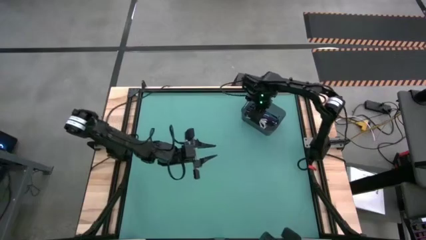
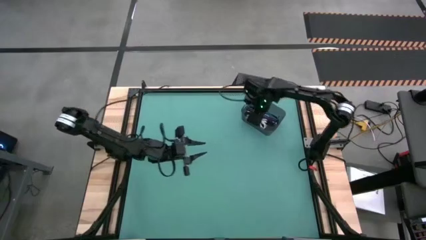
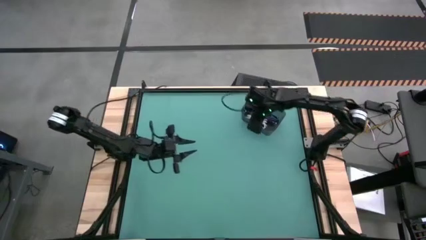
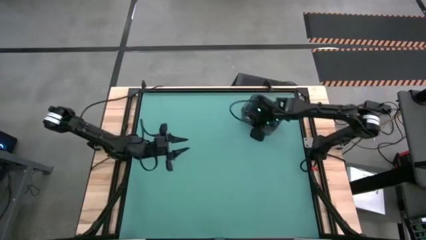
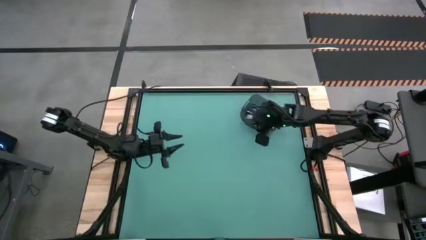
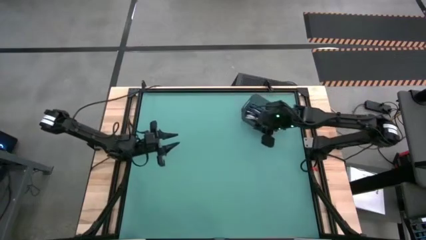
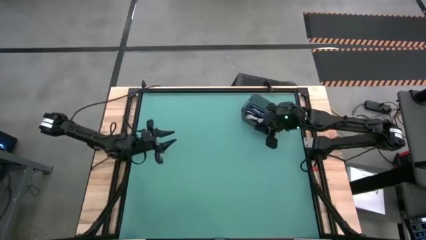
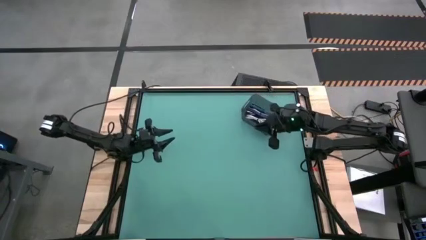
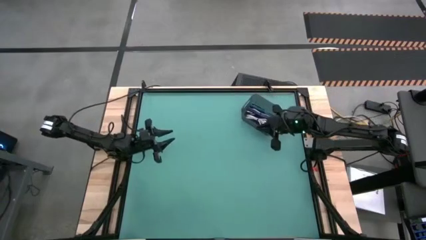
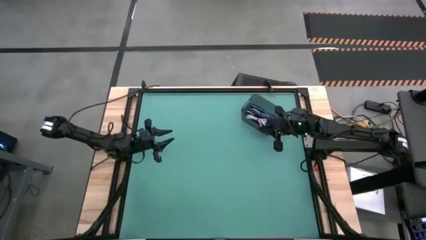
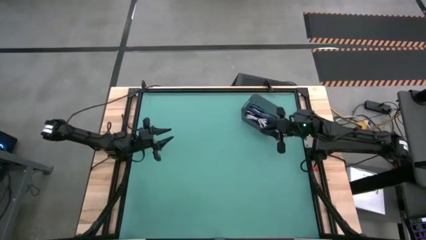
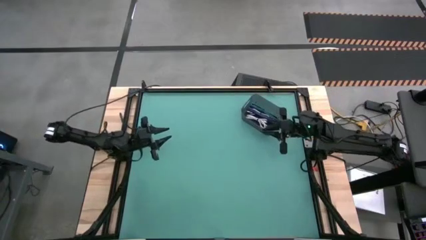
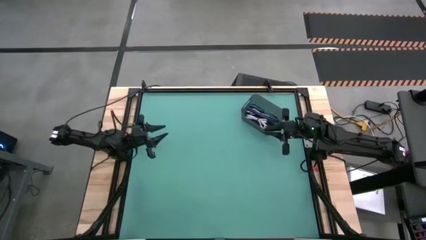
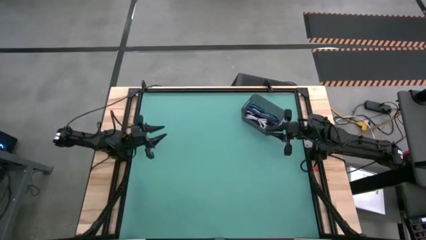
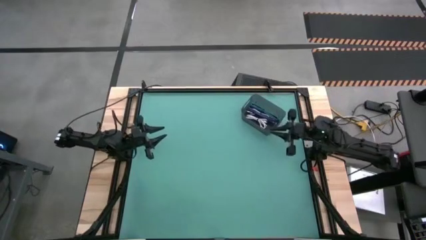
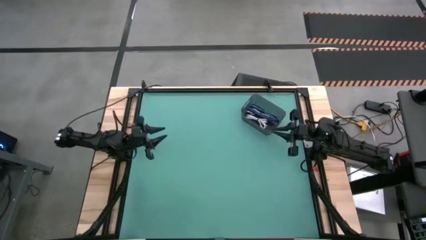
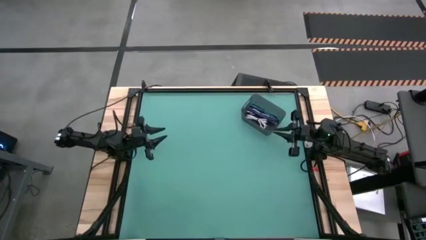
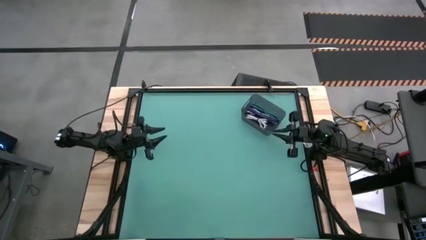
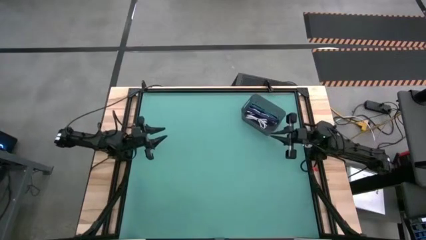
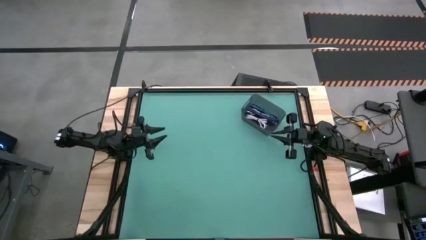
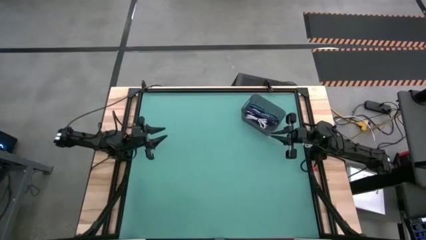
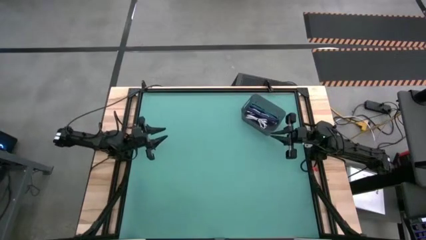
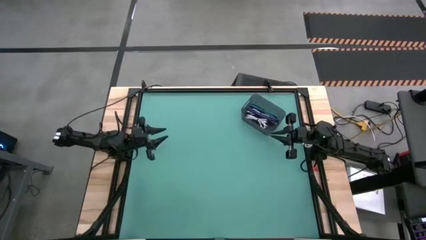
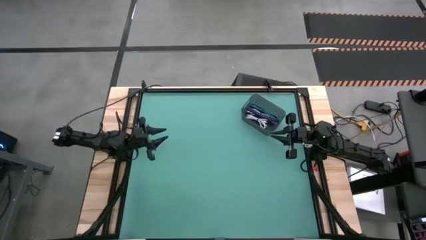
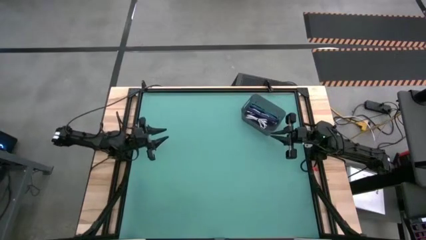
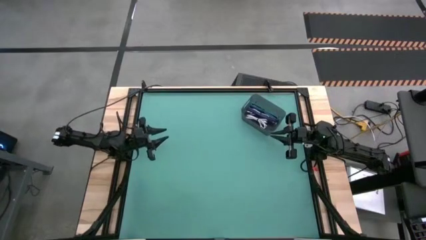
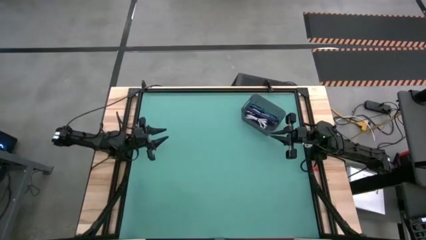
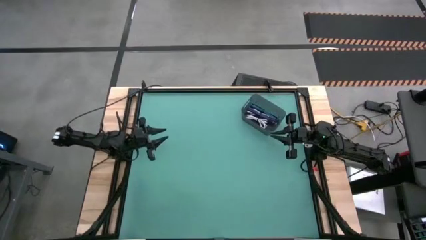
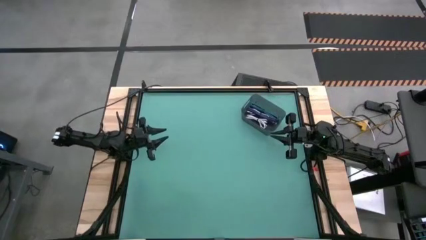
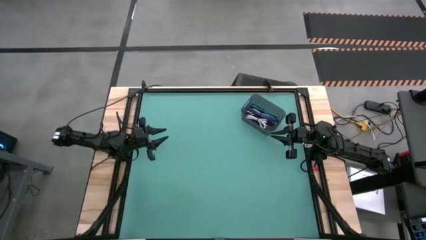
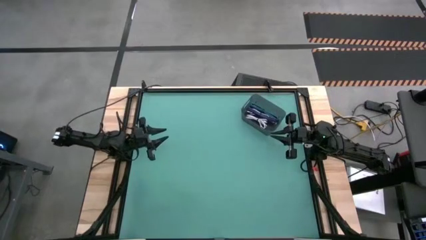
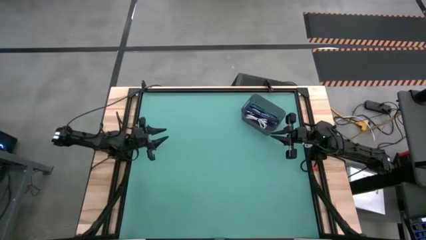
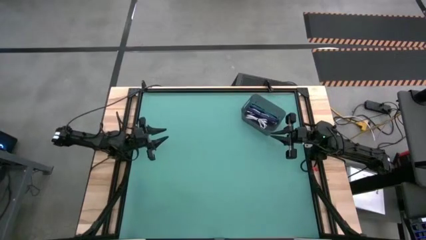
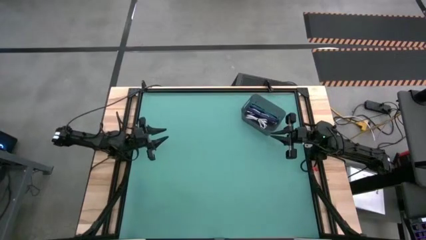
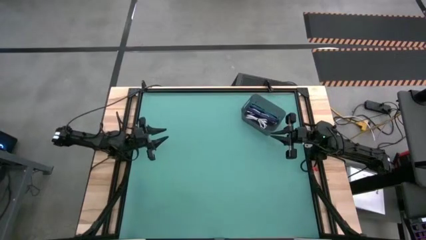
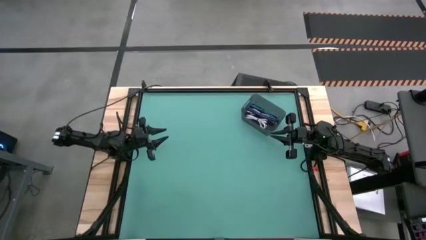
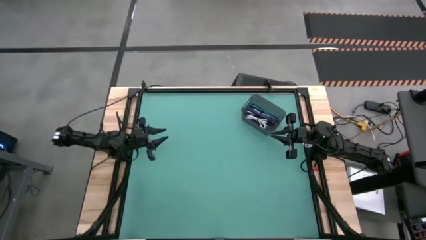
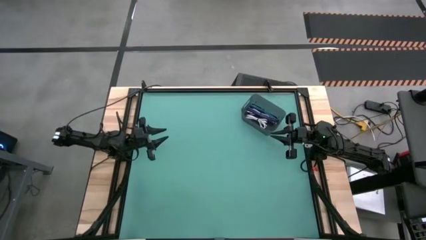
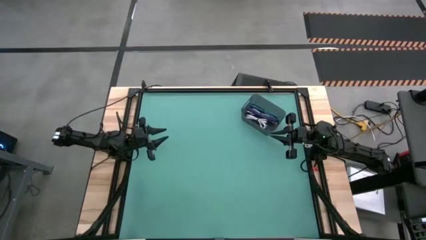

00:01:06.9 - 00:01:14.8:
Task: Pick and place USB-C Cables
Return to Home Position

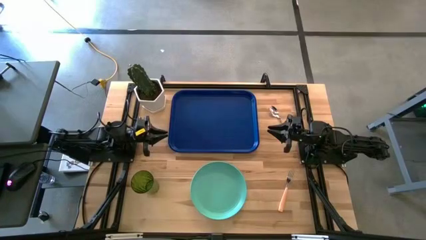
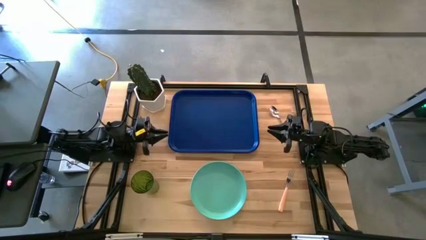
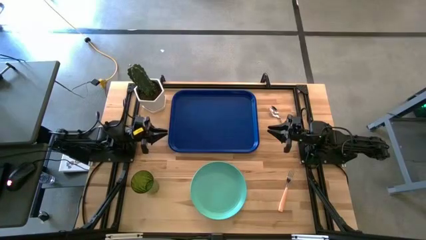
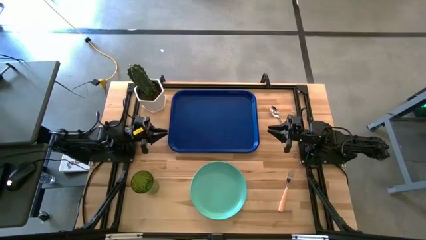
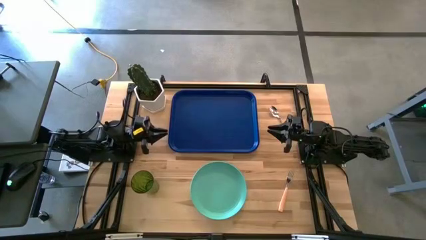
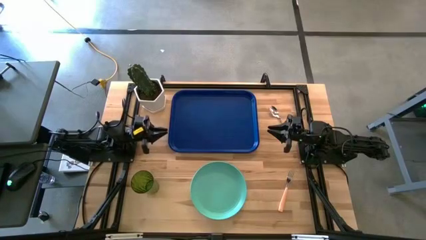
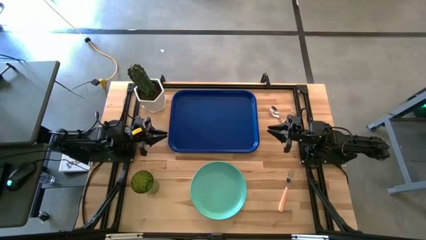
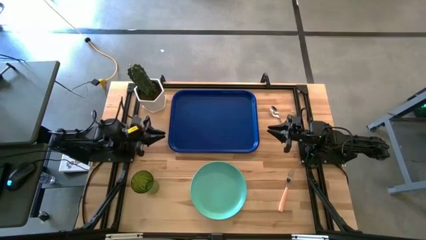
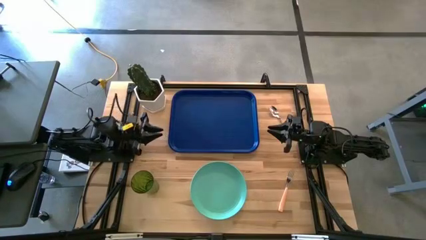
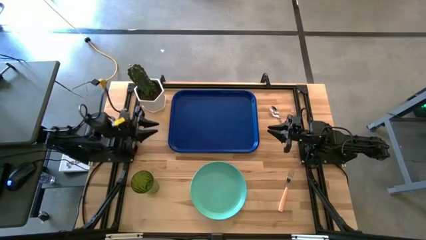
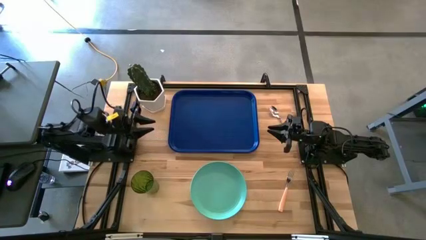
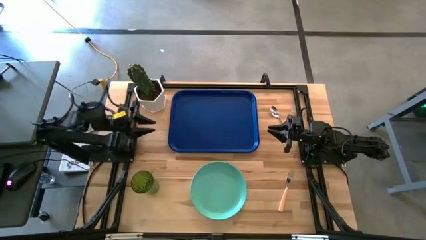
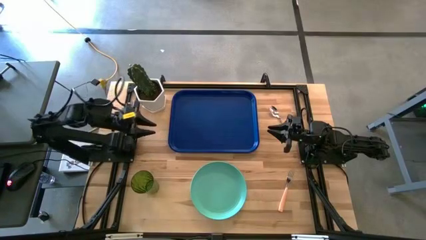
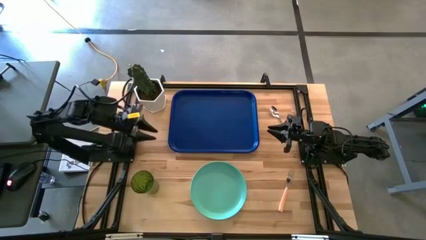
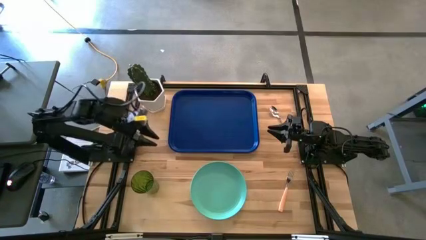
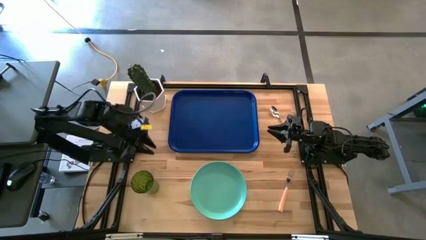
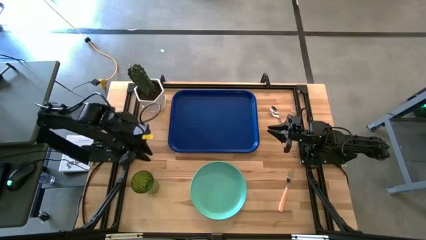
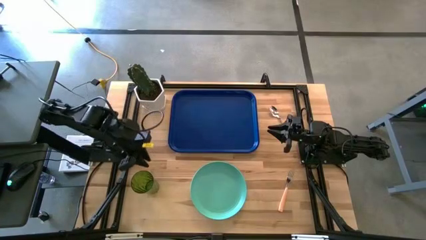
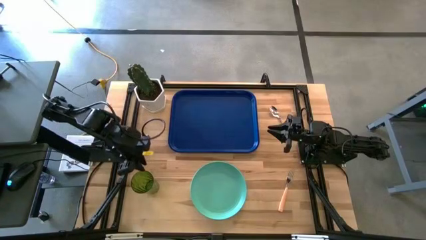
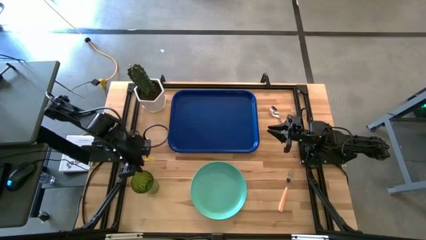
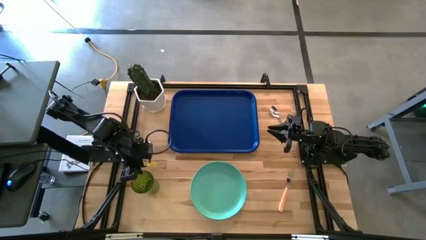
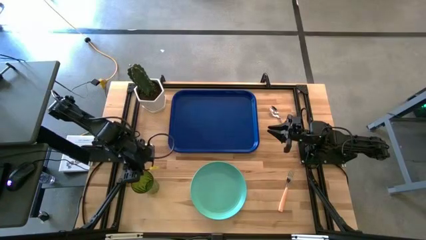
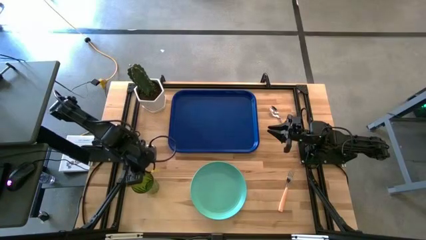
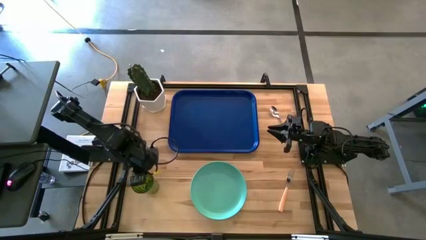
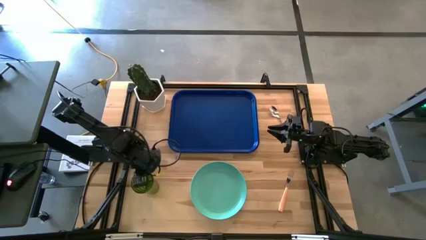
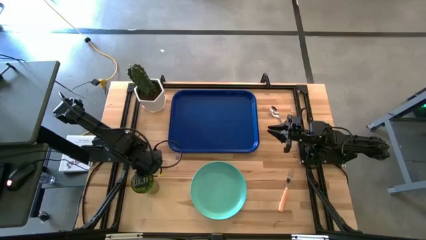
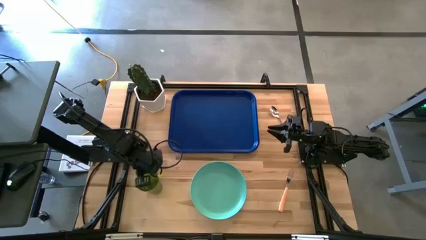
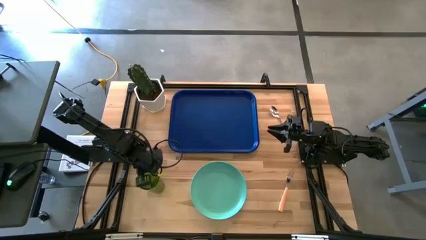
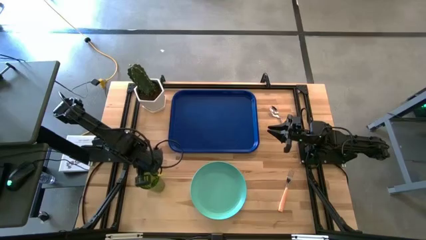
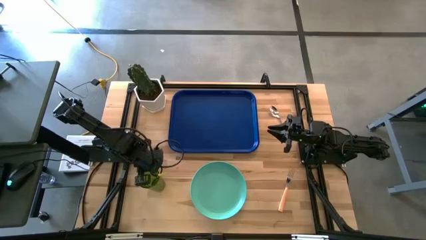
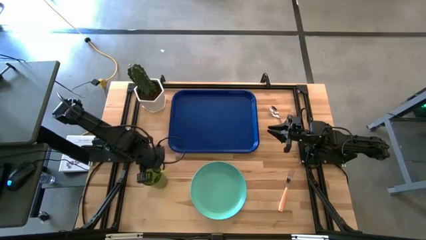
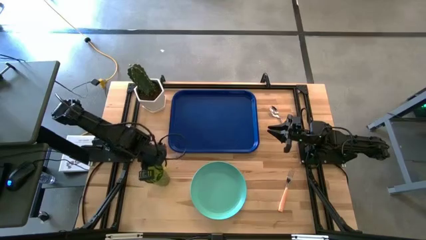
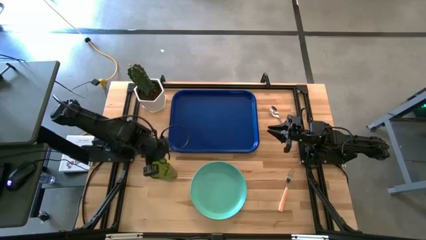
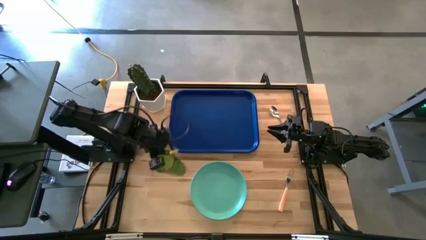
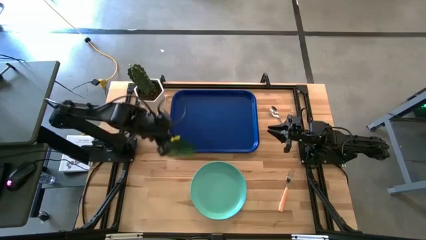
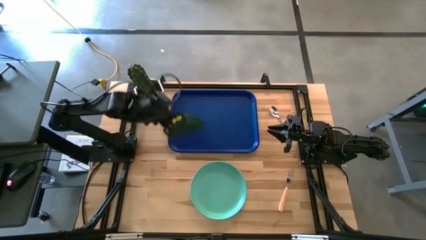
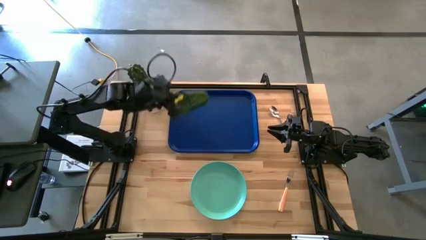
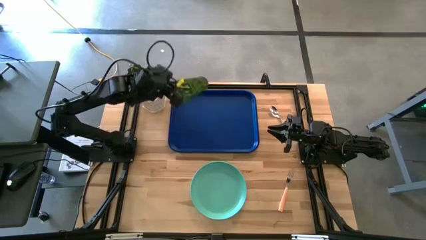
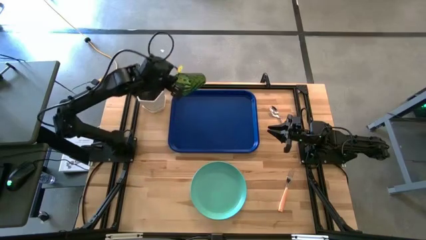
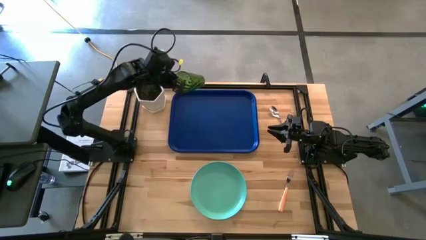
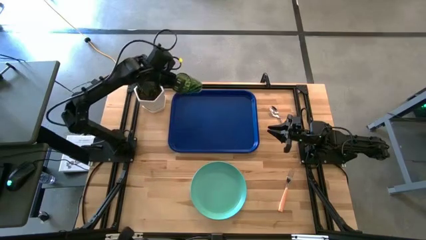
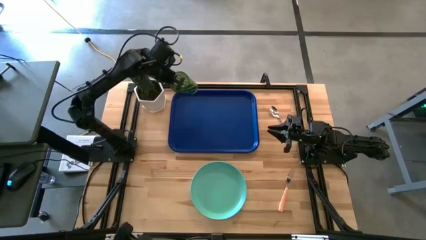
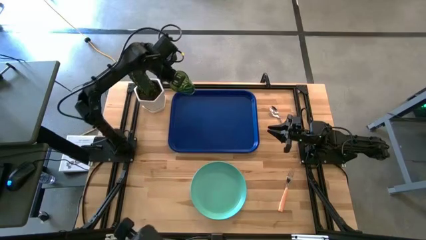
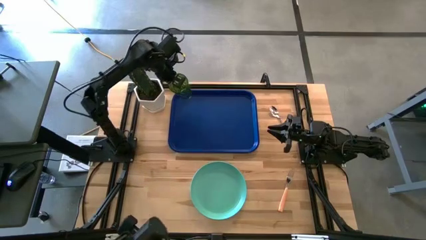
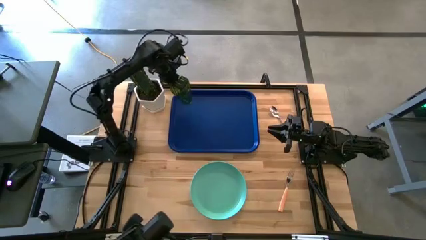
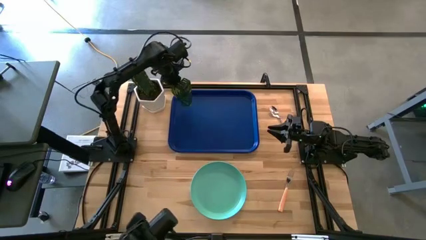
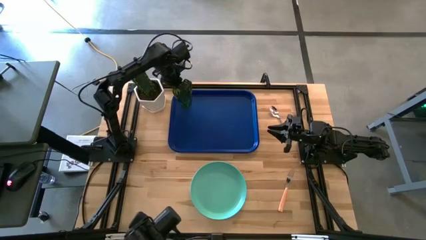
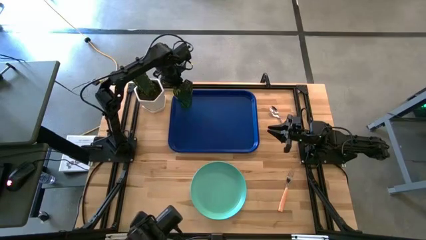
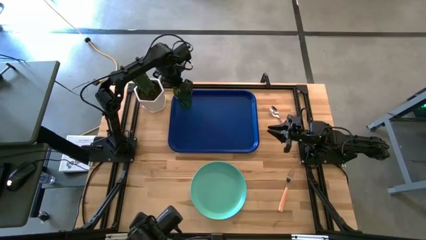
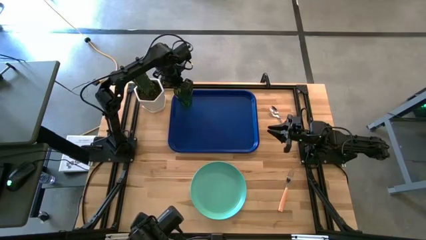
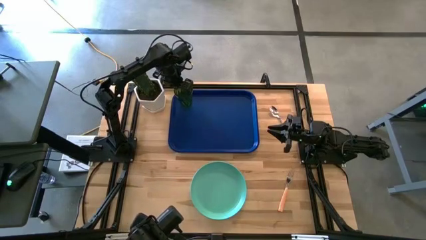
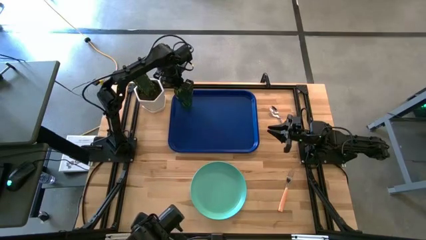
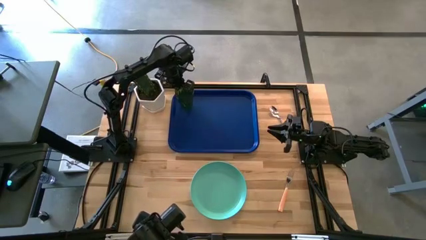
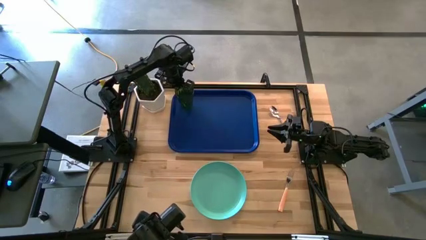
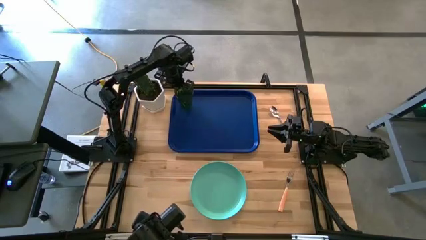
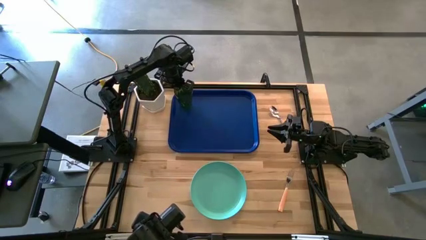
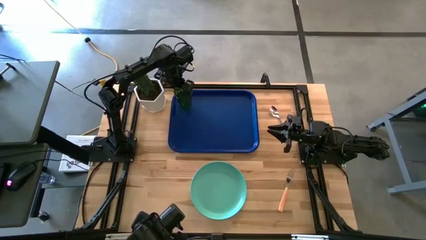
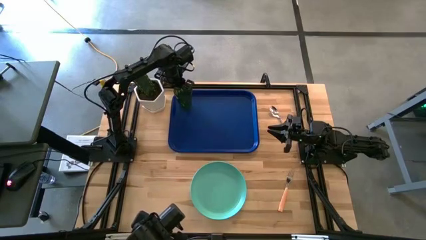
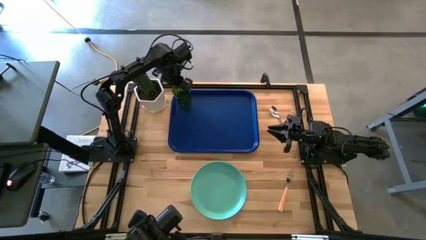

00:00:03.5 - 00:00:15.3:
Task: Pick and place plate/cup/fork/spoon on tray
Put the green glass on the blue tray
